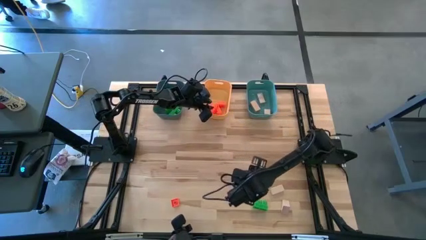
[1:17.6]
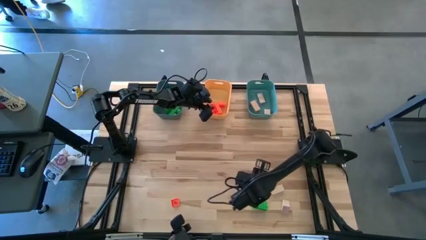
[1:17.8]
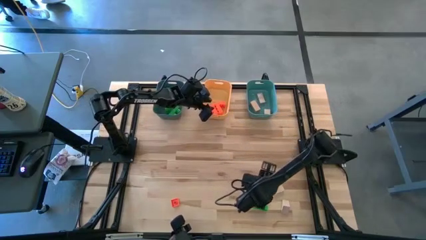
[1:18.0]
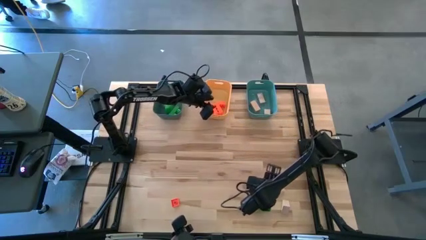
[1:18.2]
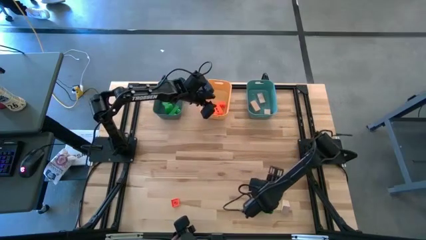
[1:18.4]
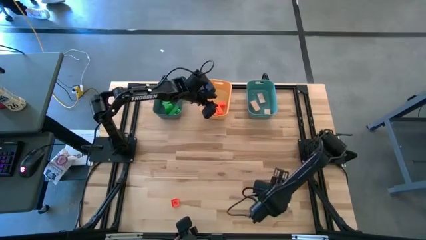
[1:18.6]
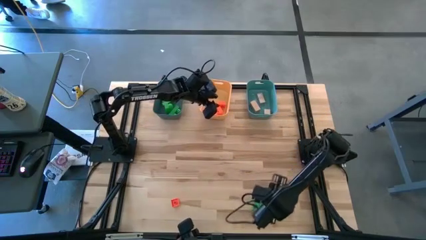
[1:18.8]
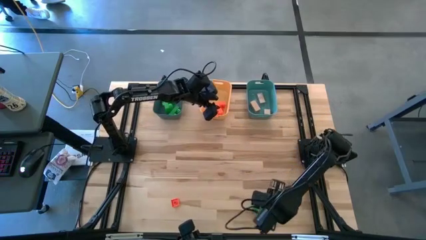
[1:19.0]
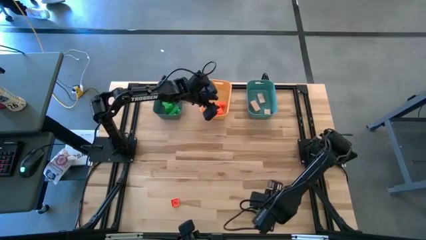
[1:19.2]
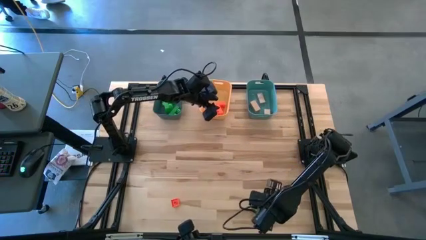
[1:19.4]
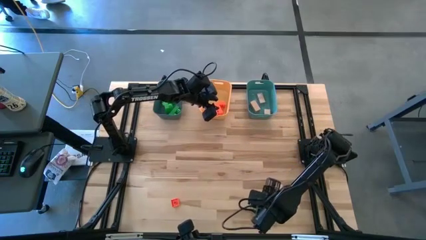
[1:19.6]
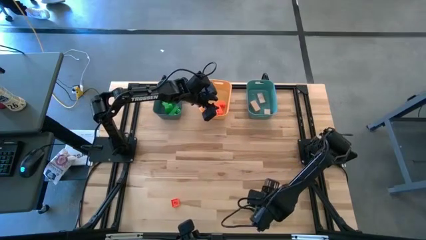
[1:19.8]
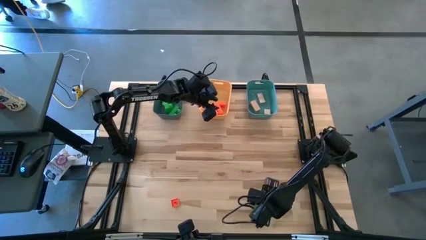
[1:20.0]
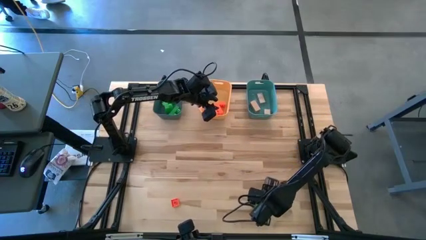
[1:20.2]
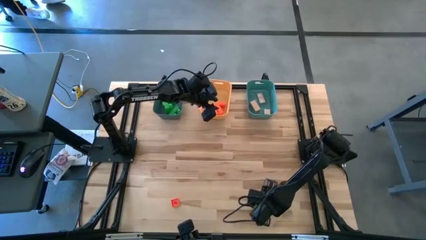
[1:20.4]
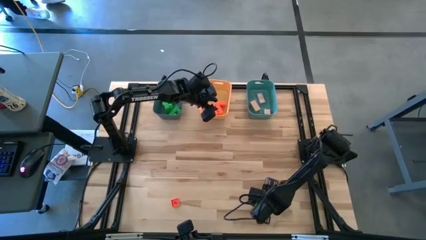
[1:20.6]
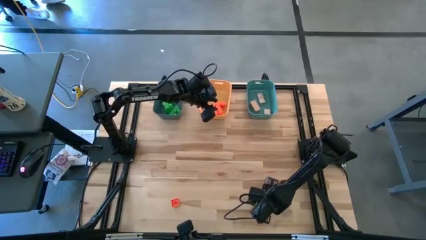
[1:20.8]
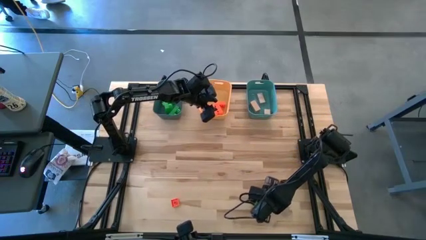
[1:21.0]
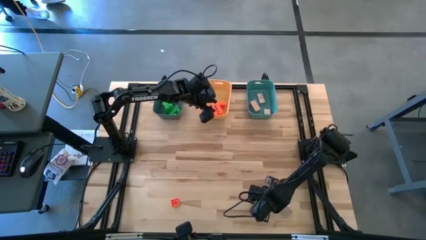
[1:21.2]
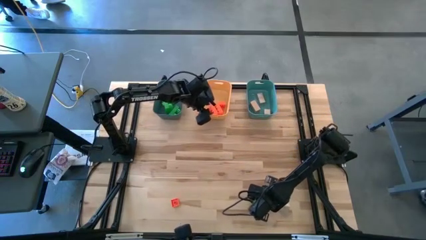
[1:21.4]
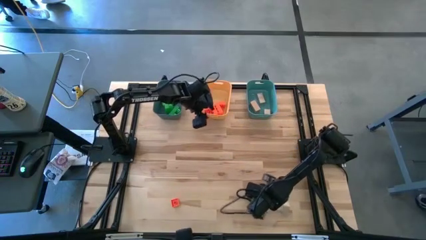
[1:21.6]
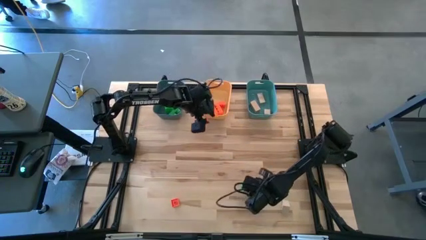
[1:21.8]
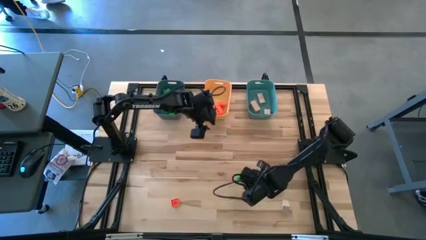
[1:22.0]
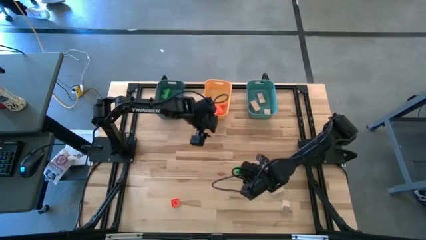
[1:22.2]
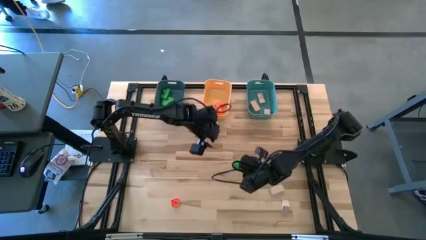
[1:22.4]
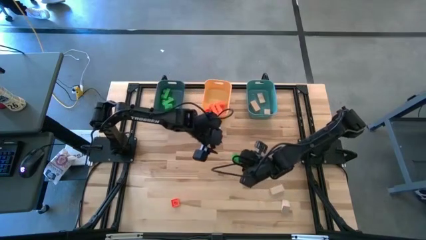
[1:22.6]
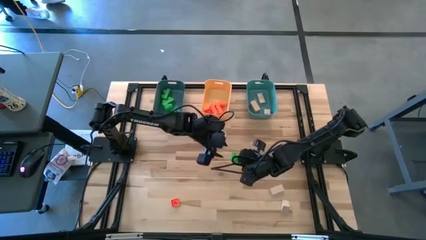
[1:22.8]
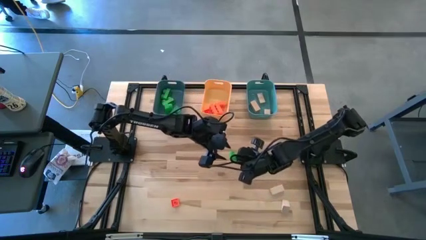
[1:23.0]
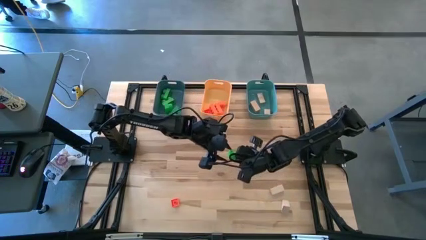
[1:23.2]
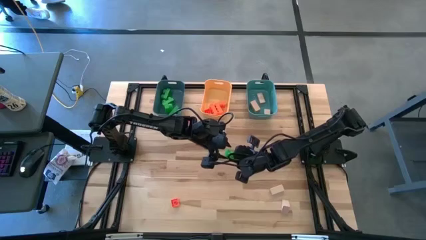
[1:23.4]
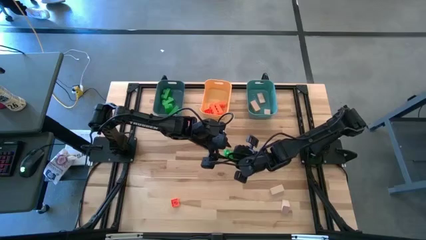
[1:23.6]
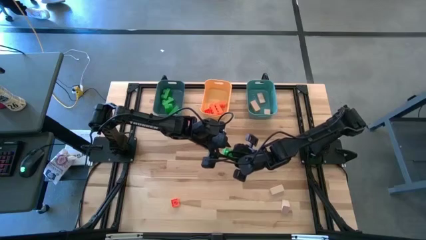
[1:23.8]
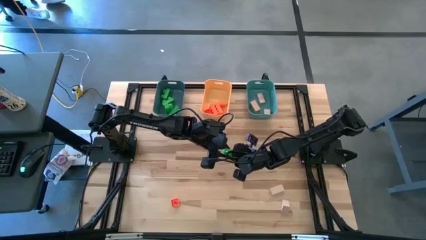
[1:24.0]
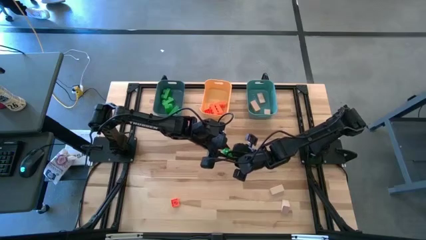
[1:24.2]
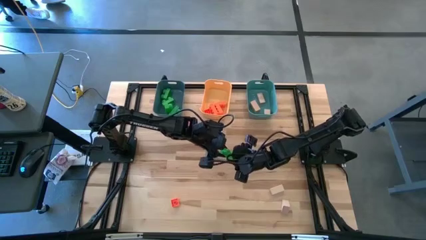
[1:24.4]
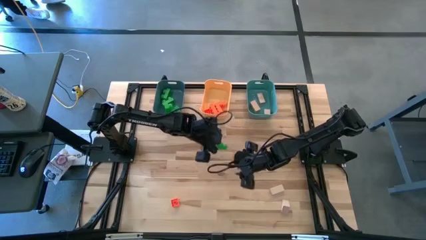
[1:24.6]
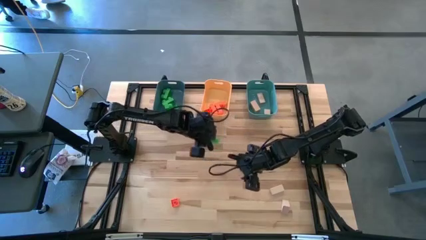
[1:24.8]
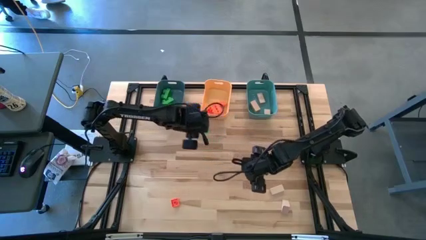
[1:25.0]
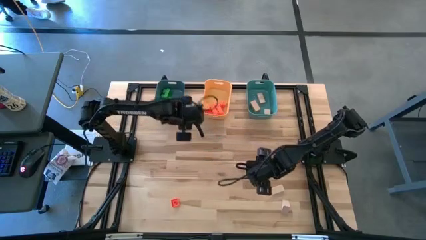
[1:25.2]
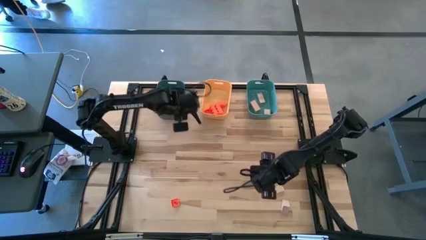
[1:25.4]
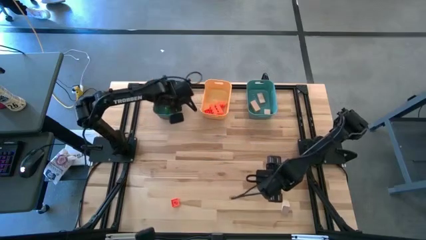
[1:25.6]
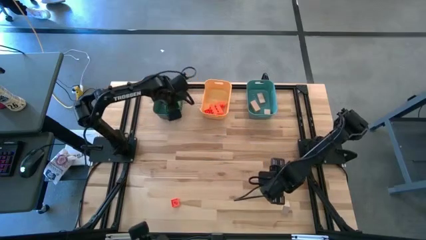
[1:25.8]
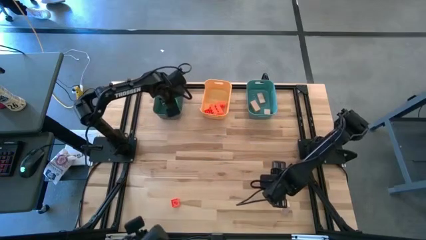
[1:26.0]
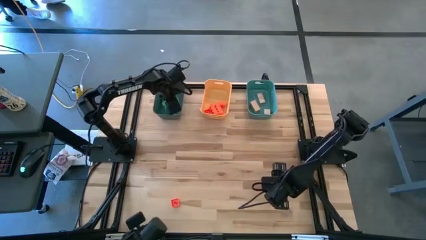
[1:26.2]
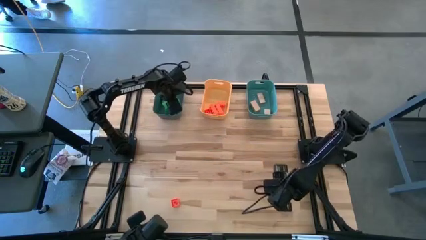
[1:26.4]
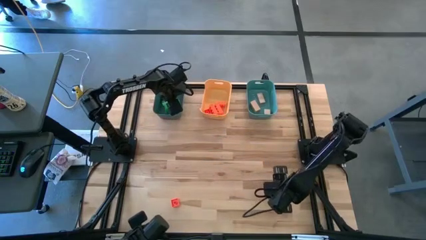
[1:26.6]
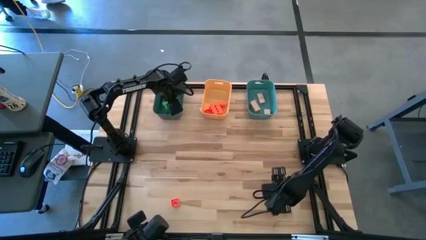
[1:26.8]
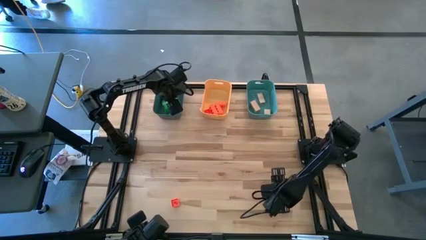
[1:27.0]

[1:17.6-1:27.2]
Task: Sort & place blocks by color
Put the green game piece into the blue bin

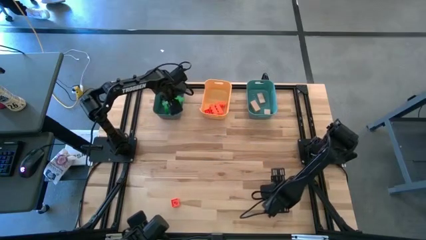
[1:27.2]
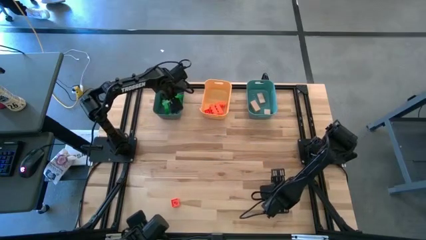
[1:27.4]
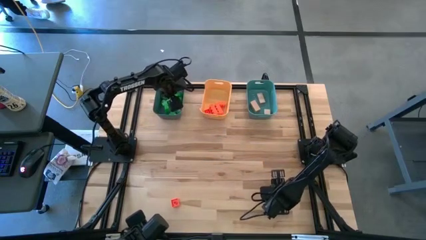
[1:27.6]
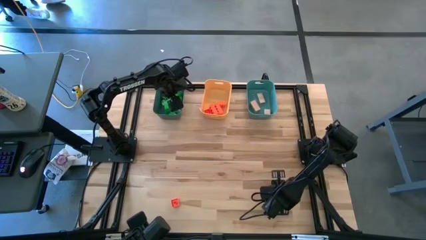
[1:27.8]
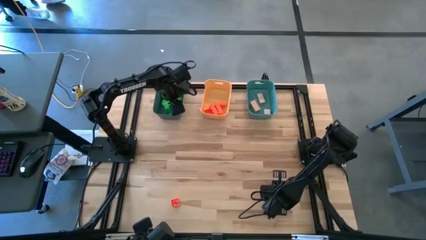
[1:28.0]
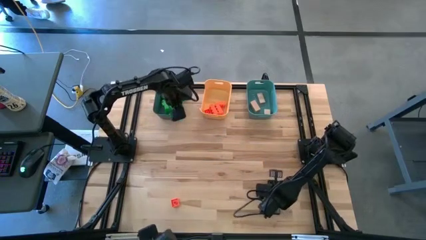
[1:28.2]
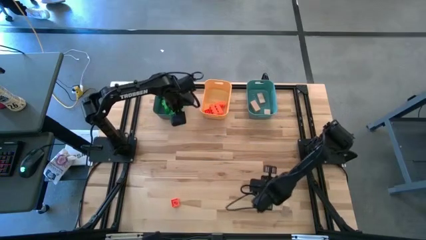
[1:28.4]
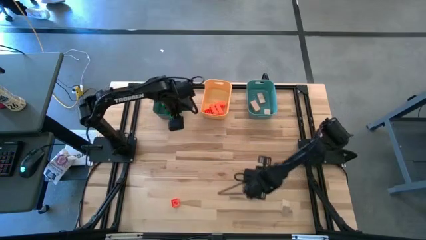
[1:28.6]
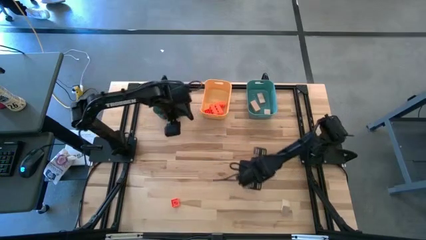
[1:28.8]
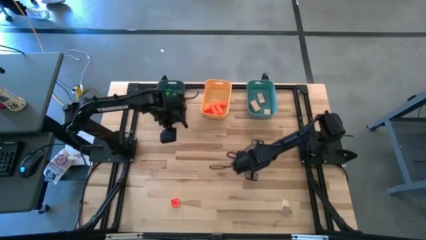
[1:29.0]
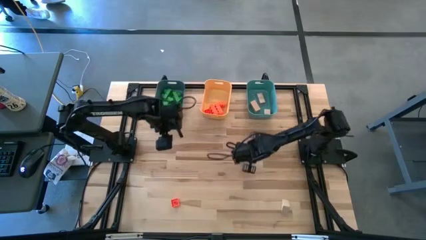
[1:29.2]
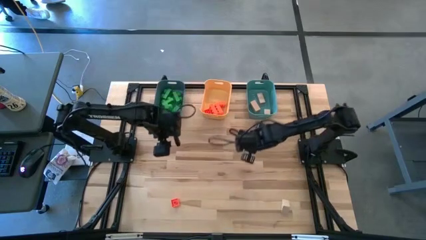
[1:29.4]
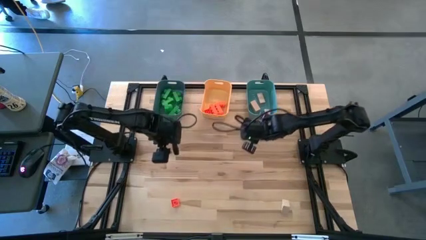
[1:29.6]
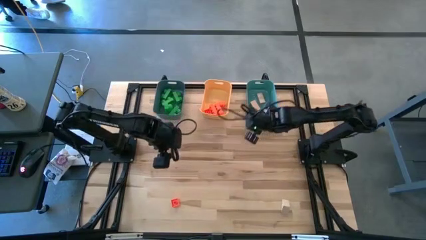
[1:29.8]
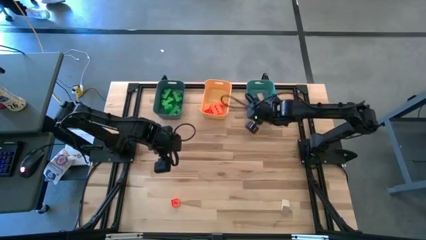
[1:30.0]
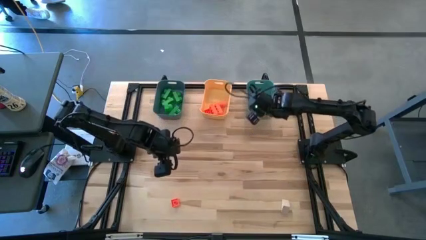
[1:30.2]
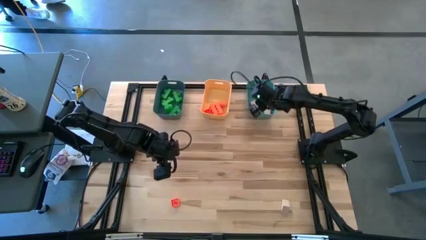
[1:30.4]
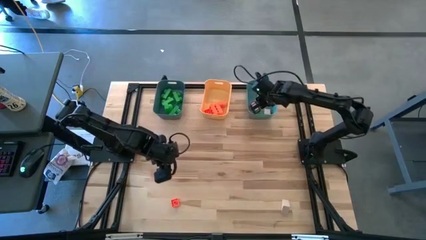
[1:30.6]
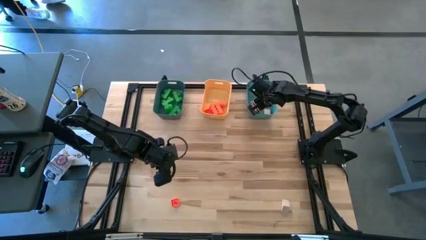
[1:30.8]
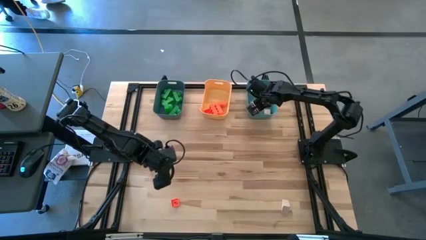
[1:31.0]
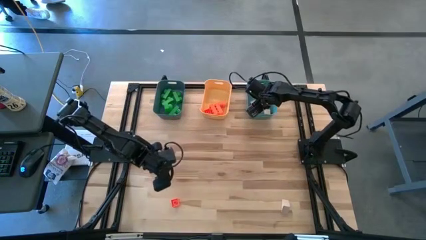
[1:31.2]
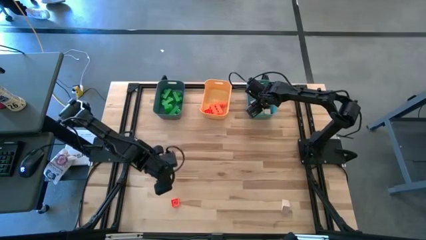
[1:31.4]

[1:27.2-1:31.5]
Put the white block into the green bin
